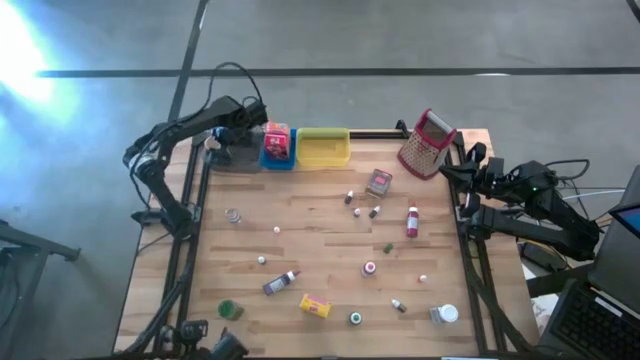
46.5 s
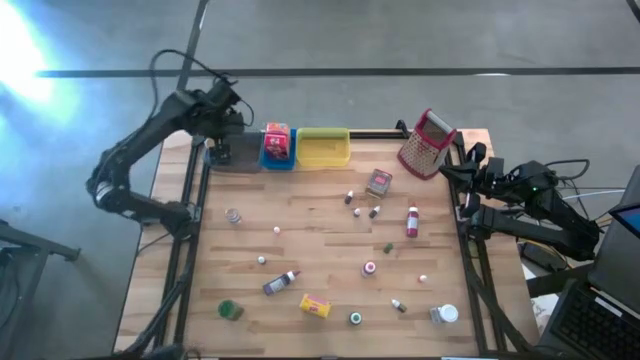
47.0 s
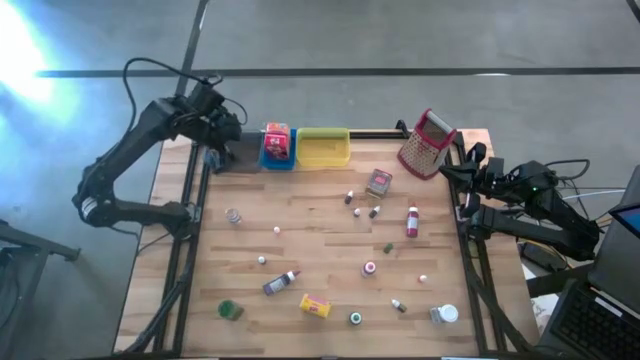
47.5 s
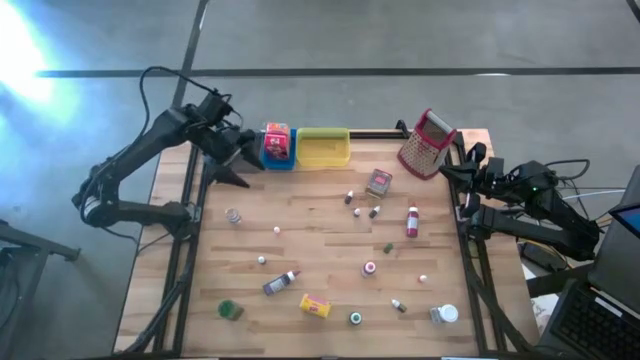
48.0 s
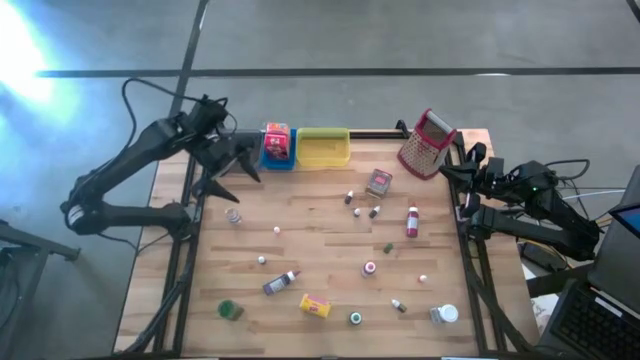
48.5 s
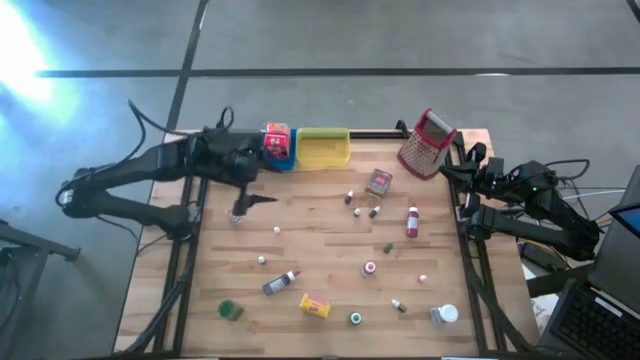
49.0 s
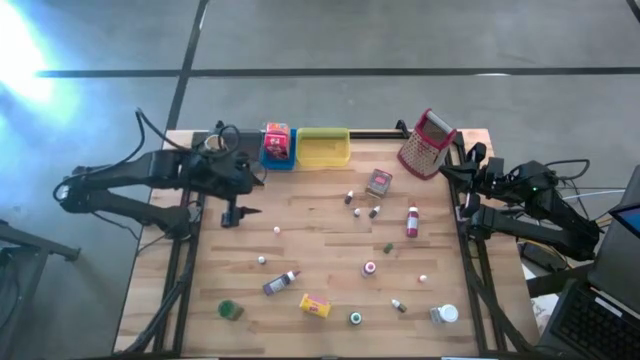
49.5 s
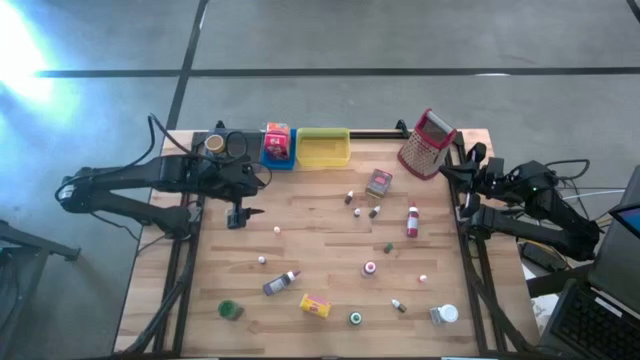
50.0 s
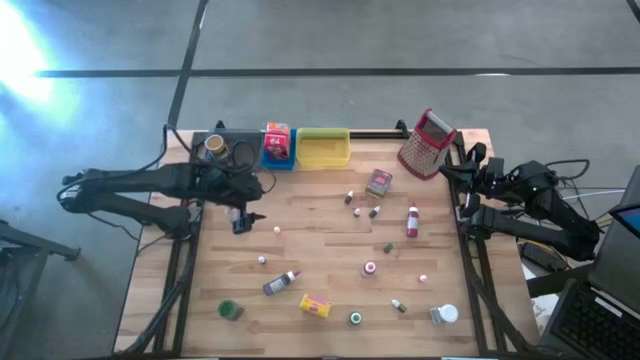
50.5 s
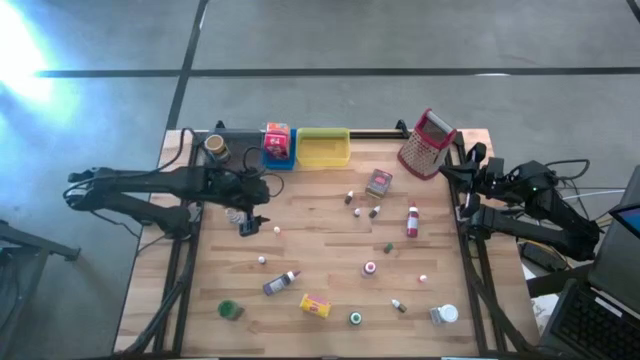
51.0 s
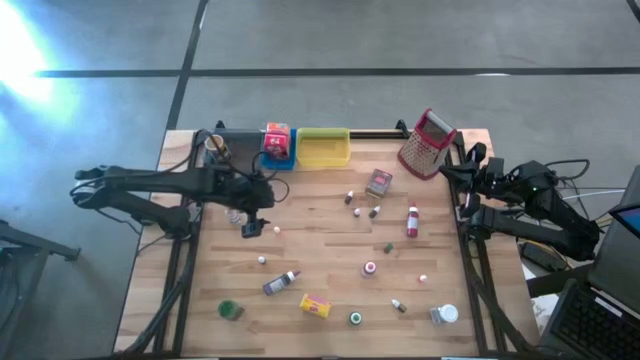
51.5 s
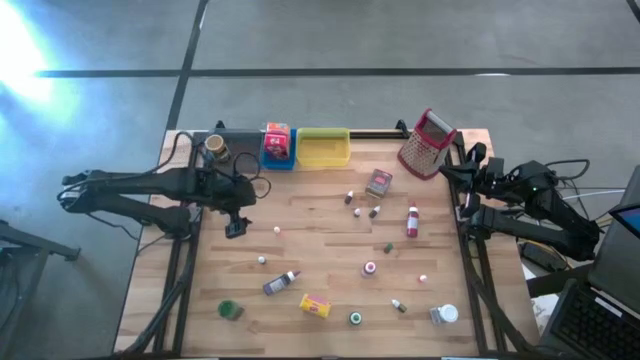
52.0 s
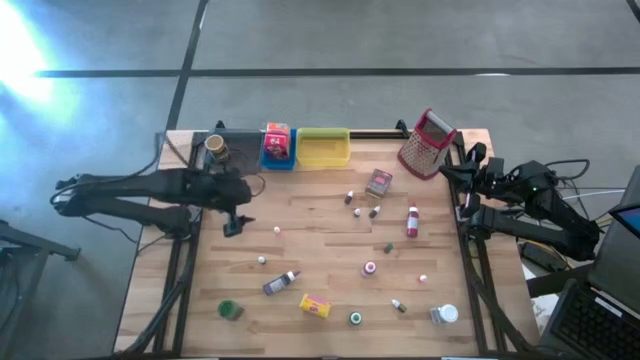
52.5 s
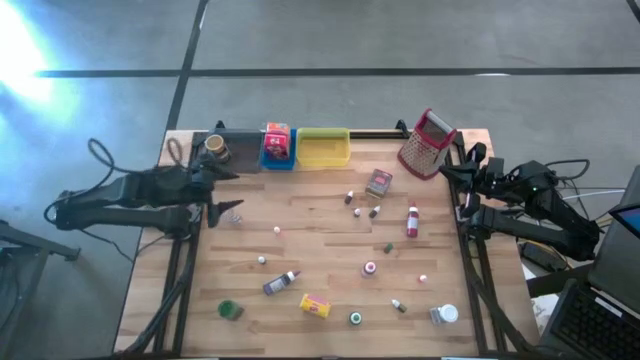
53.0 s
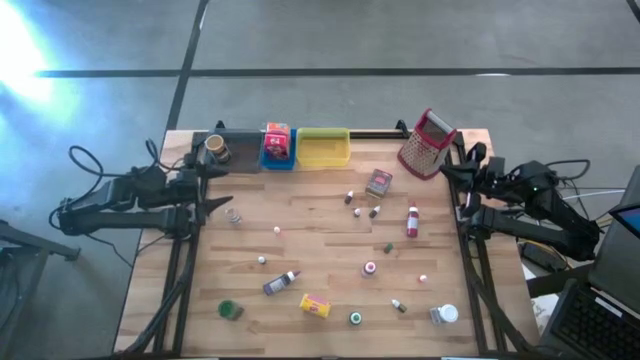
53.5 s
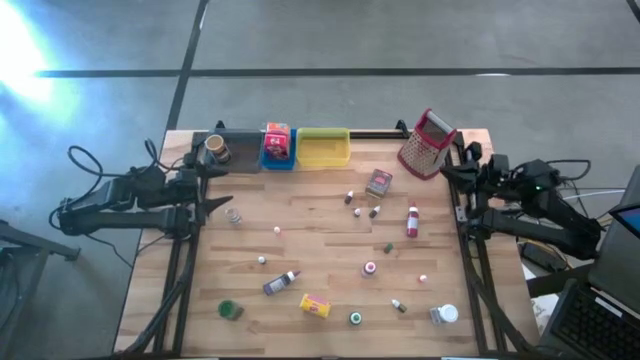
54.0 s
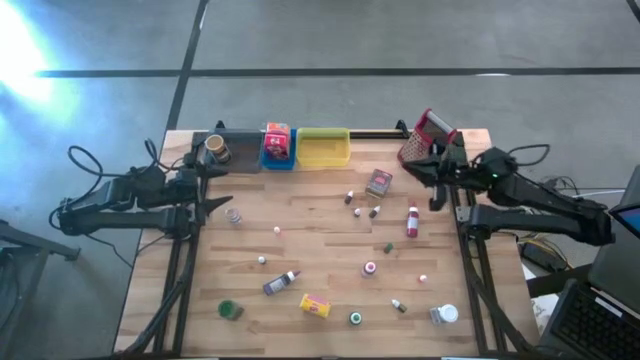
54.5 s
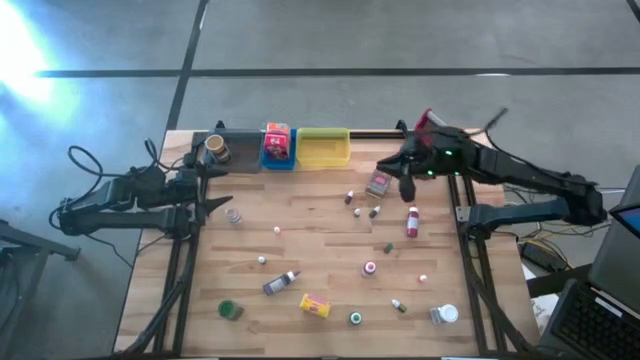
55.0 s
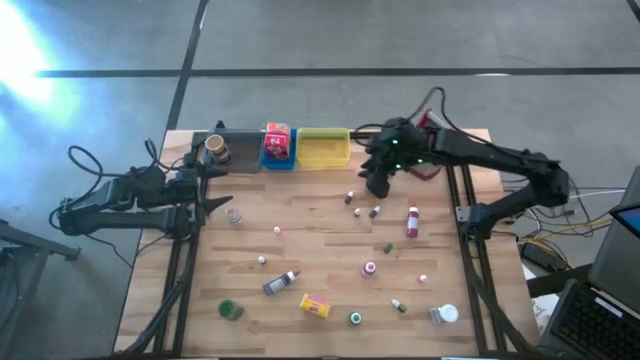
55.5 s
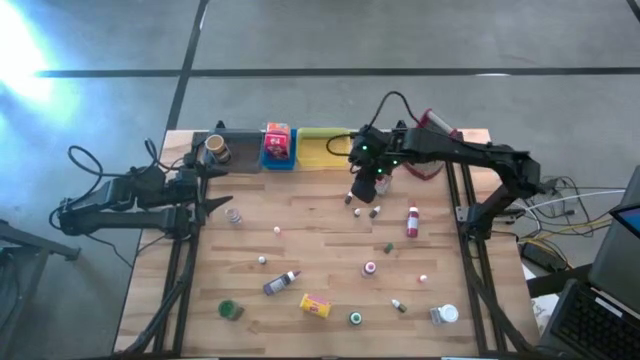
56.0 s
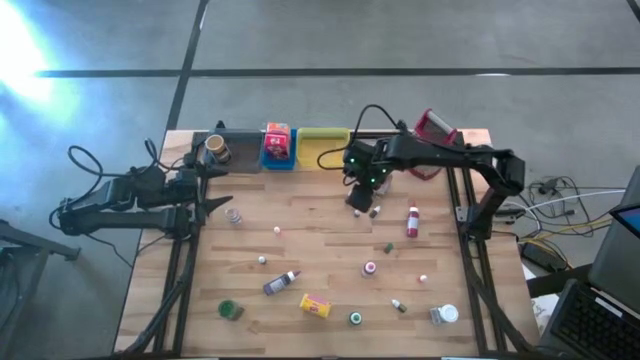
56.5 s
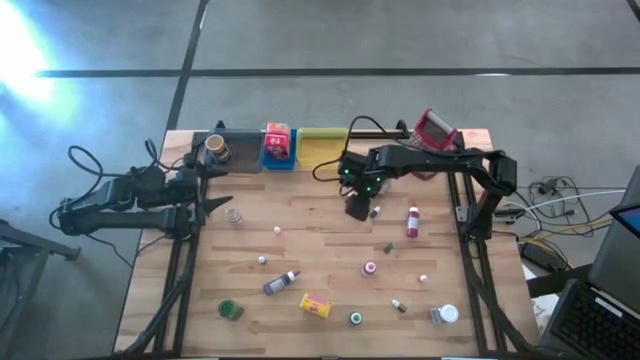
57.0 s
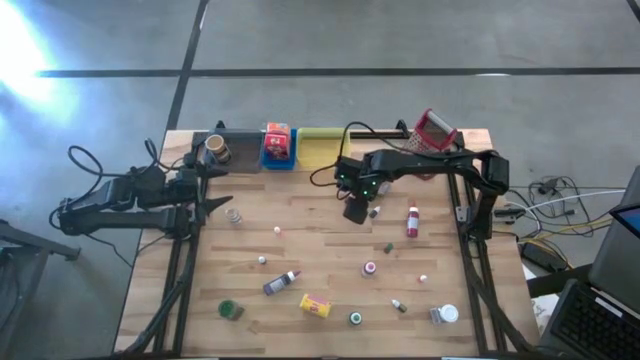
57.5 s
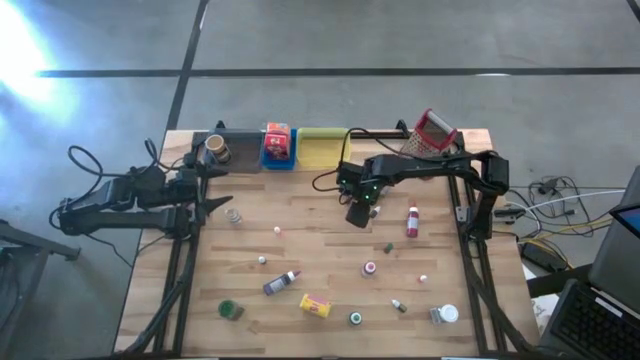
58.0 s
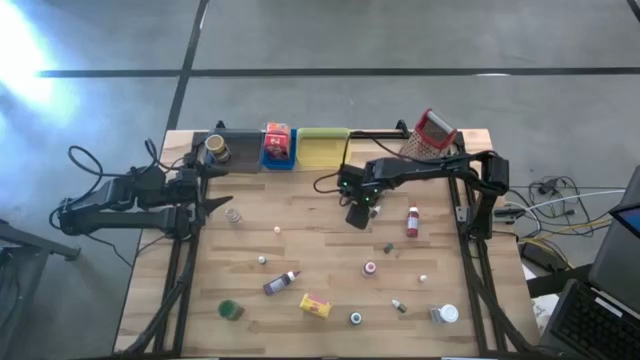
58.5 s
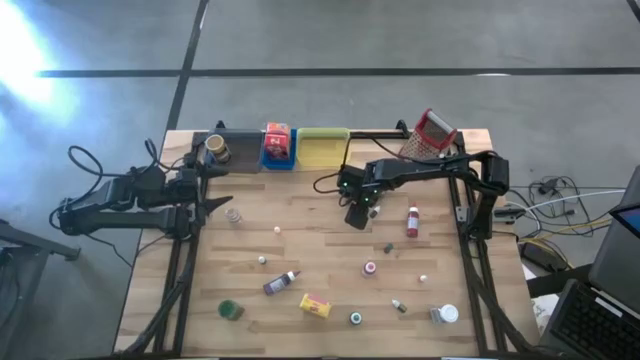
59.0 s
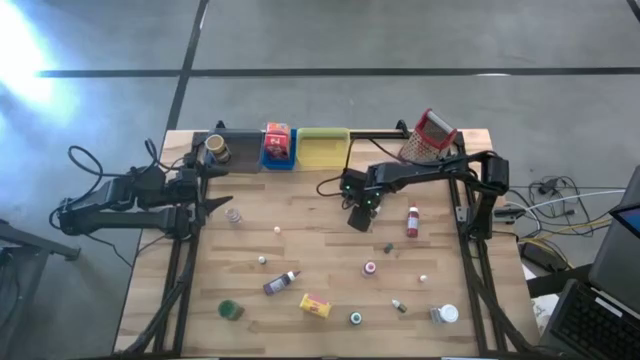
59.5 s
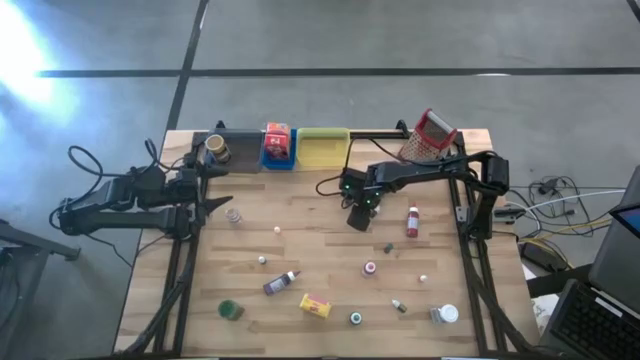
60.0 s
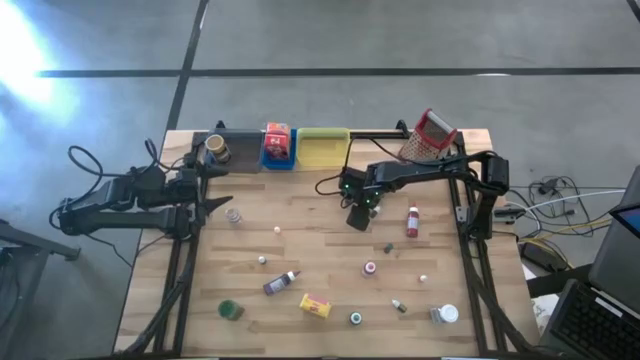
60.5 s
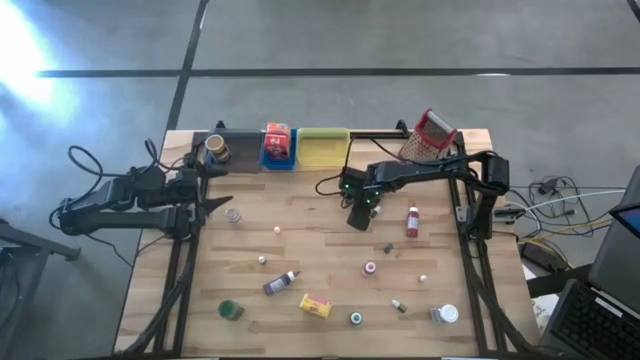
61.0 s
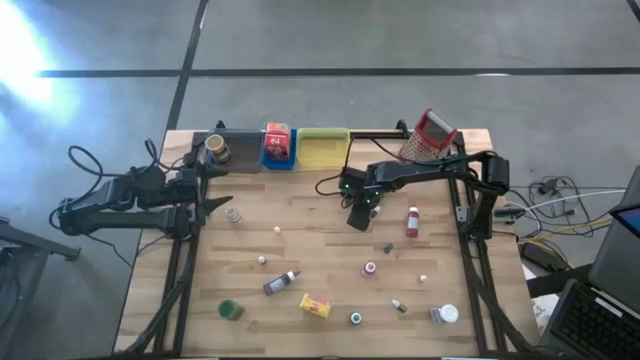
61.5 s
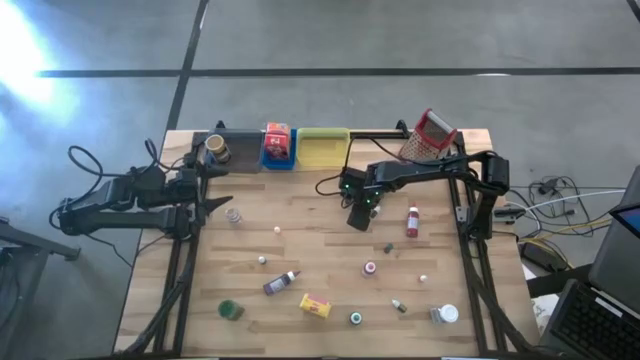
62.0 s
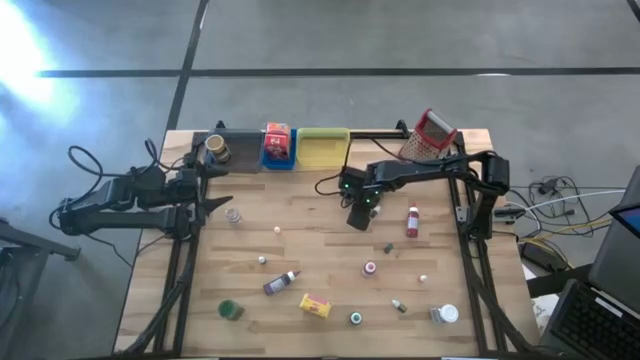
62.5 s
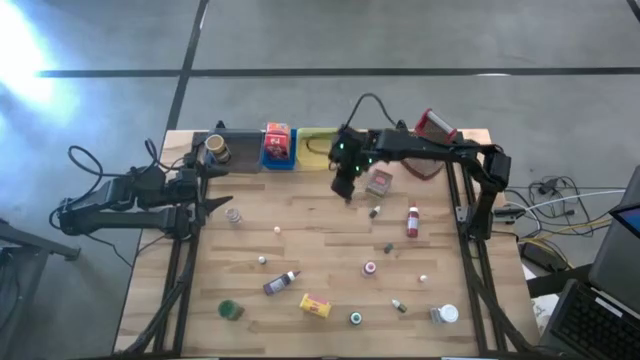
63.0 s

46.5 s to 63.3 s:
Task: Pick & Place Kitchen Items
Put the black food coloring bottle into the yellow bin

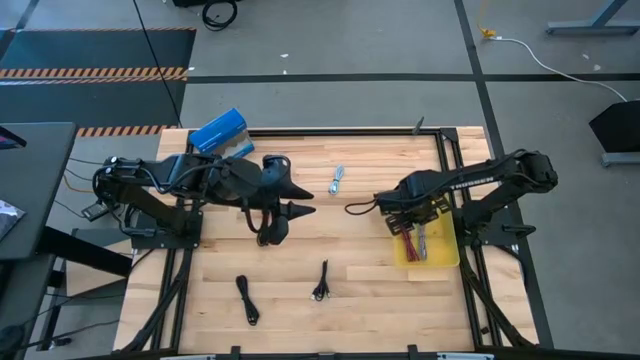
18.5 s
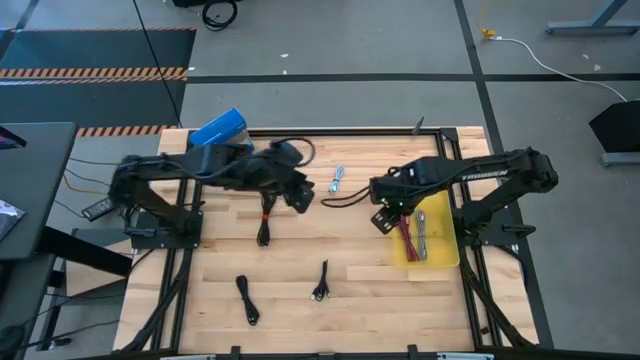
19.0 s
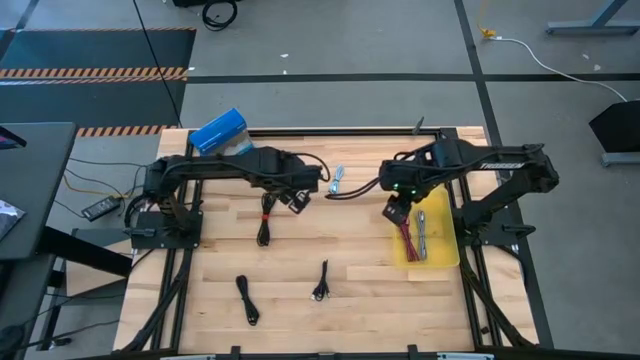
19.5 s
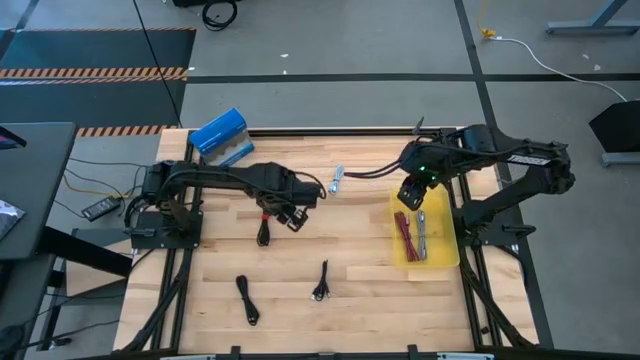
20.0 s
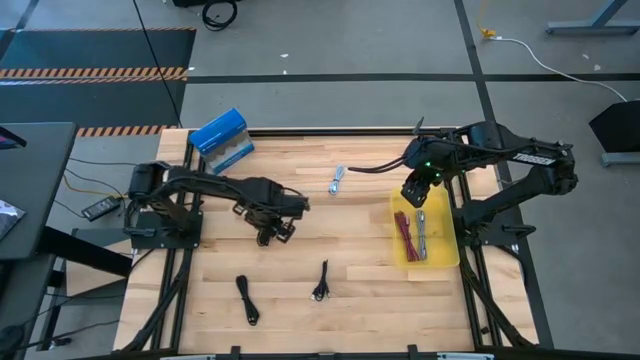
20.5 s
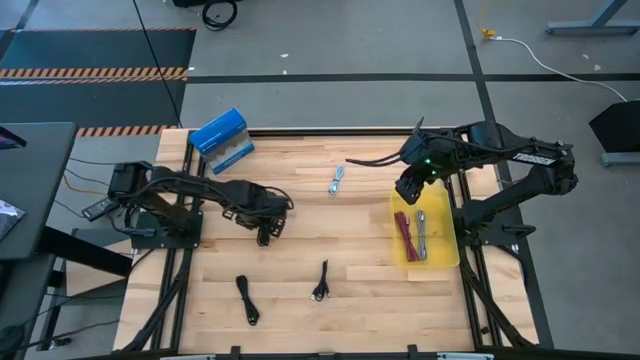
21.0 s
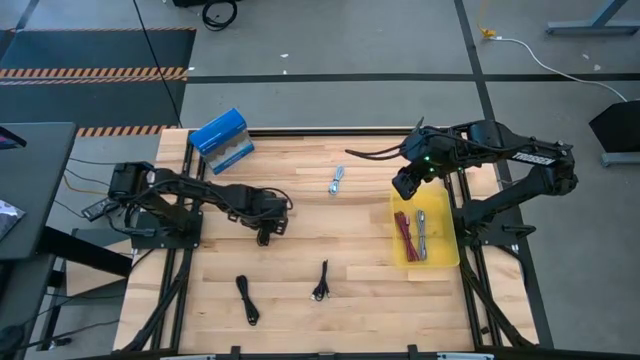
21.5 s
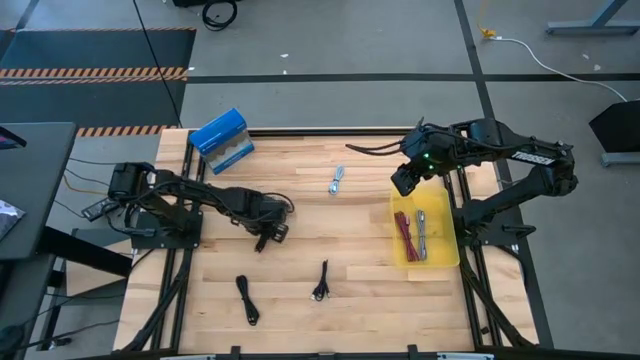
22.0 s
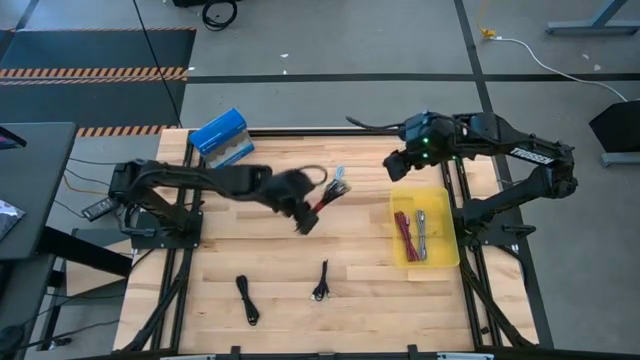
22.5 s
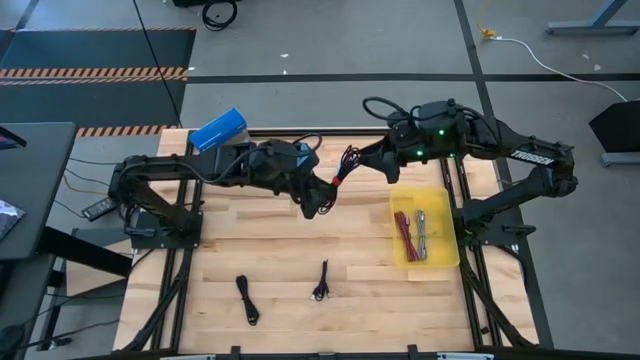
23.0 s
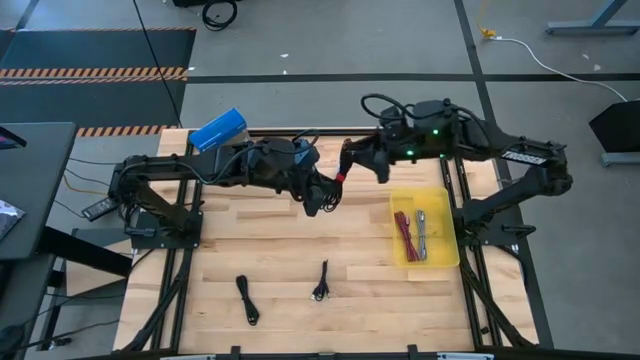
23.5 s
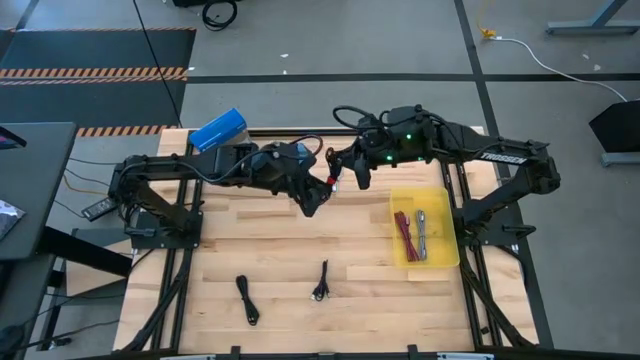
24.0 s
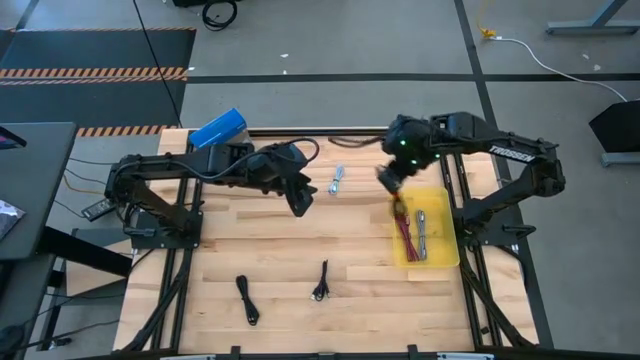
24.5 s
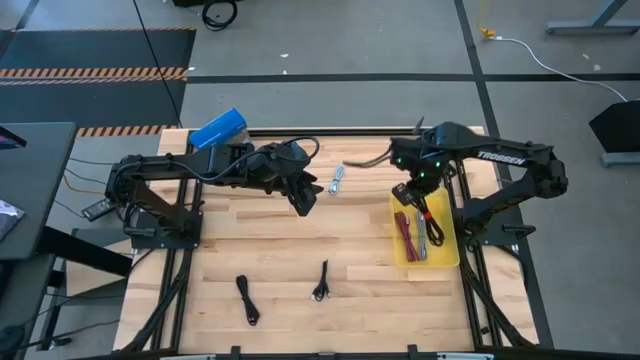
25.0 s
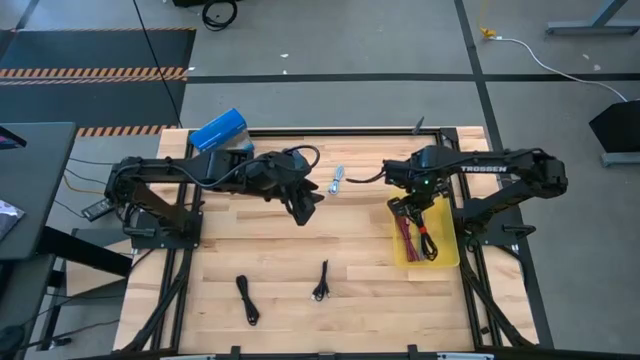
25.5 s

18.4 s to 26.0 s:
Task: Pick and place USB-C Cables
Put the top black charger cable into the yellow bin
